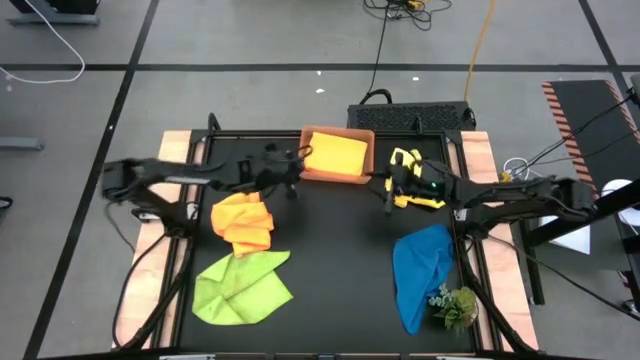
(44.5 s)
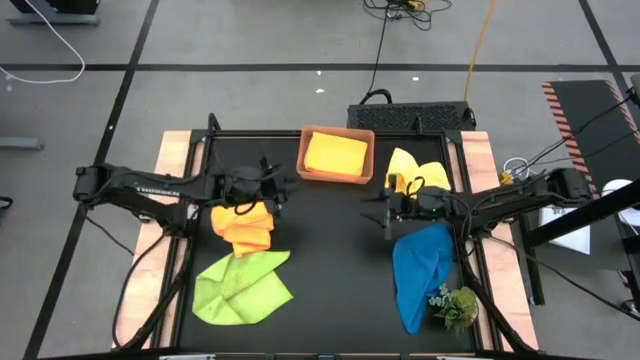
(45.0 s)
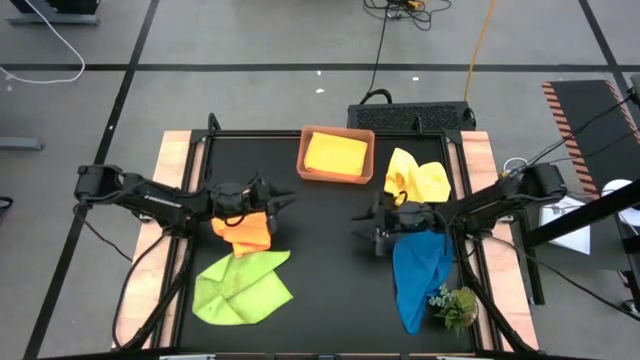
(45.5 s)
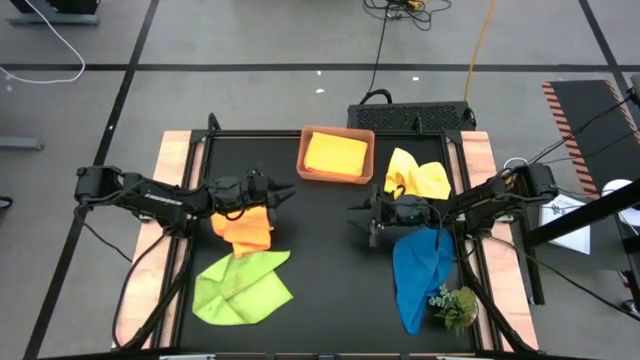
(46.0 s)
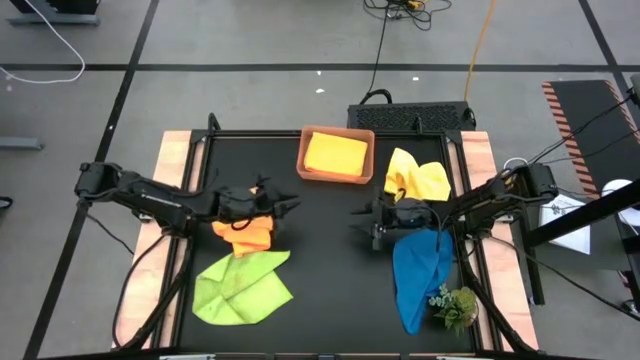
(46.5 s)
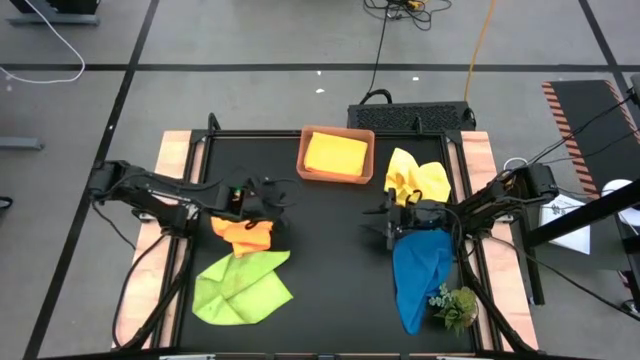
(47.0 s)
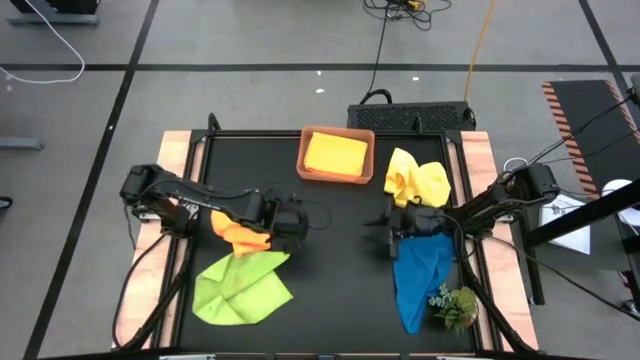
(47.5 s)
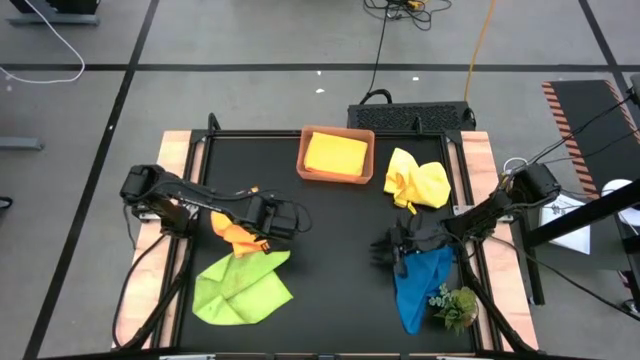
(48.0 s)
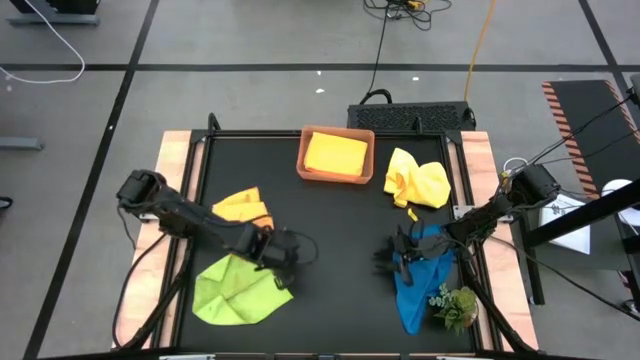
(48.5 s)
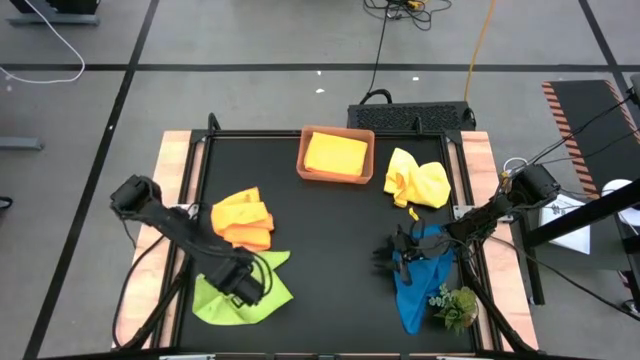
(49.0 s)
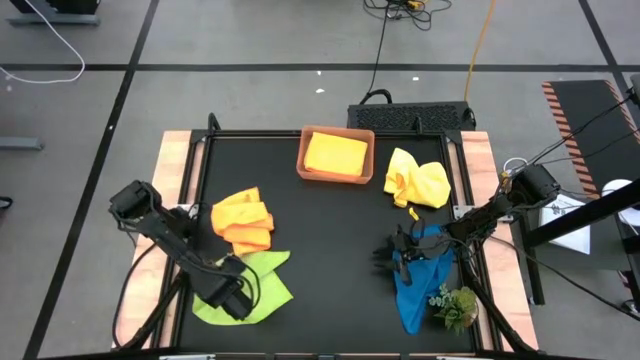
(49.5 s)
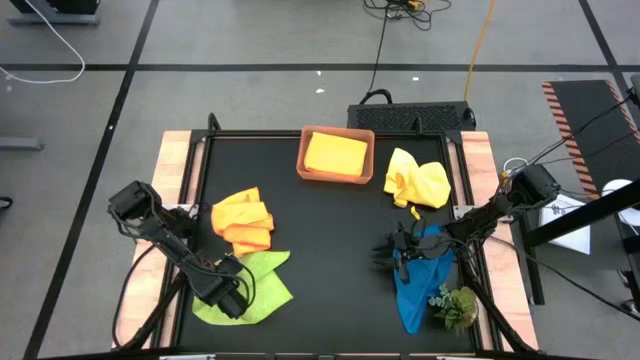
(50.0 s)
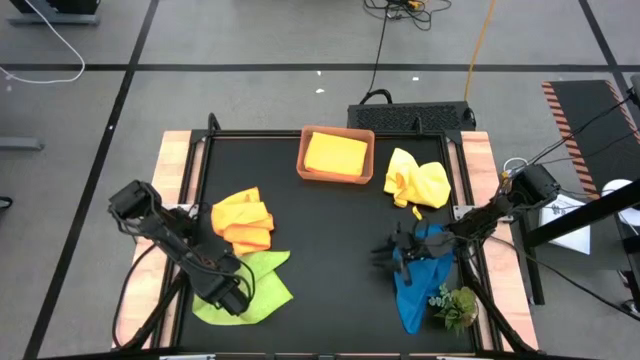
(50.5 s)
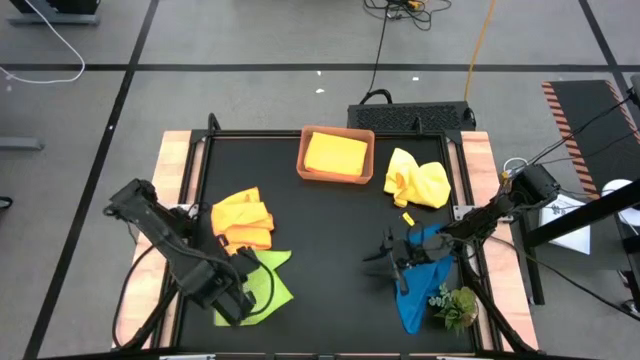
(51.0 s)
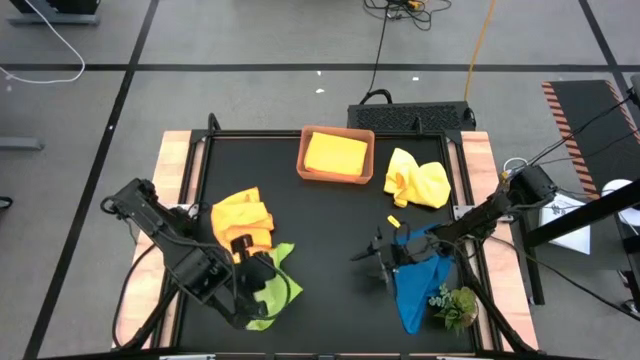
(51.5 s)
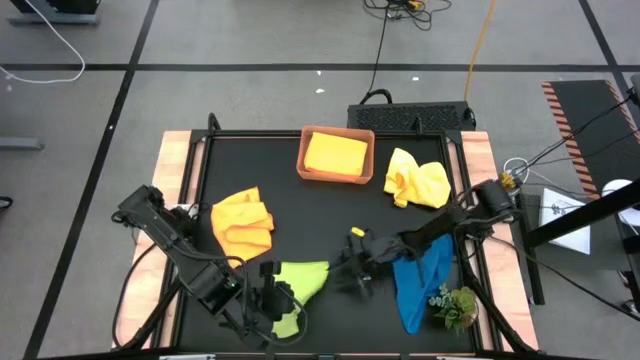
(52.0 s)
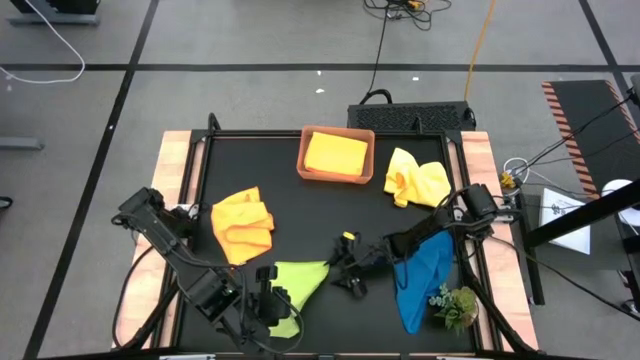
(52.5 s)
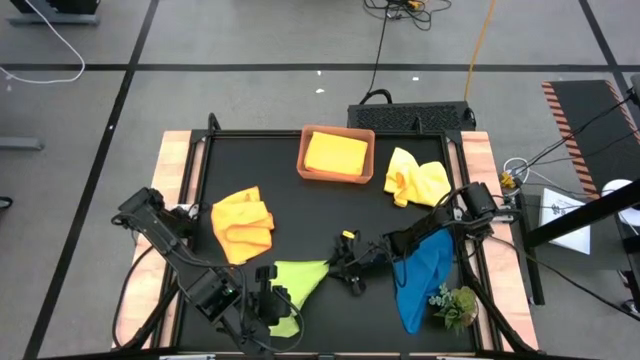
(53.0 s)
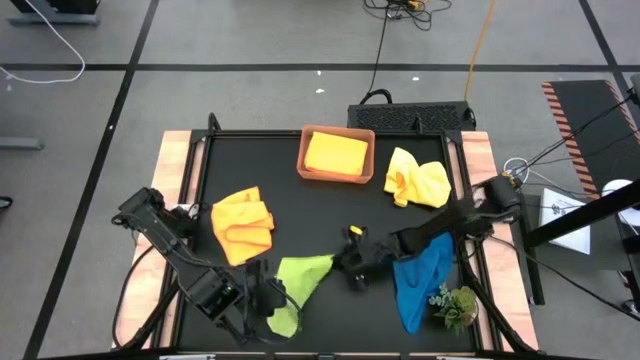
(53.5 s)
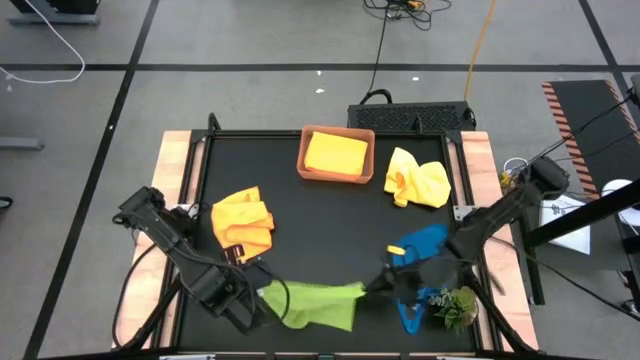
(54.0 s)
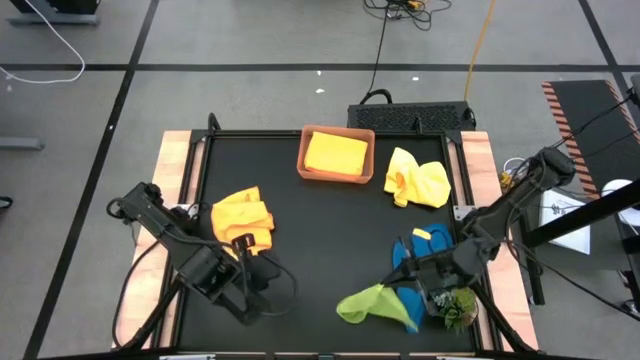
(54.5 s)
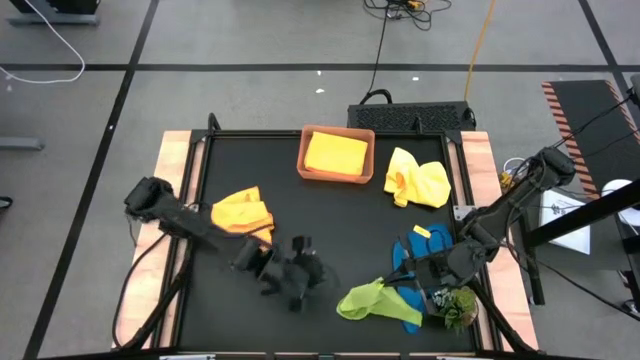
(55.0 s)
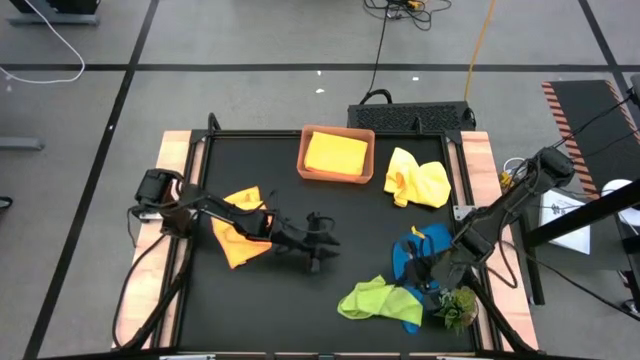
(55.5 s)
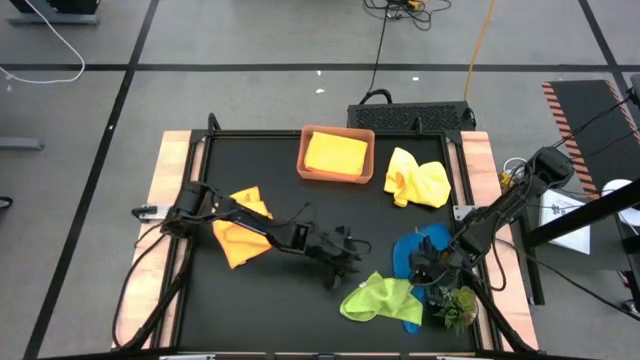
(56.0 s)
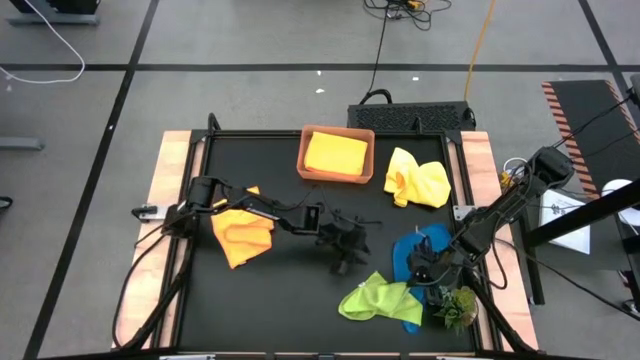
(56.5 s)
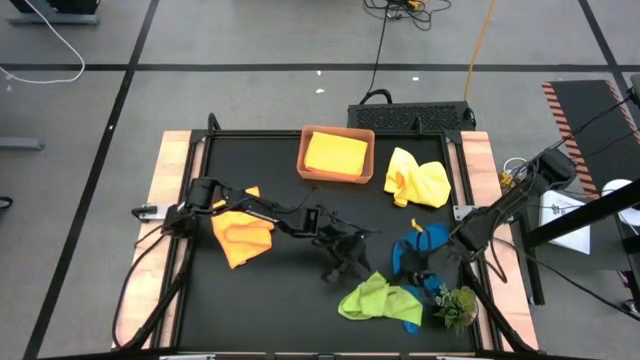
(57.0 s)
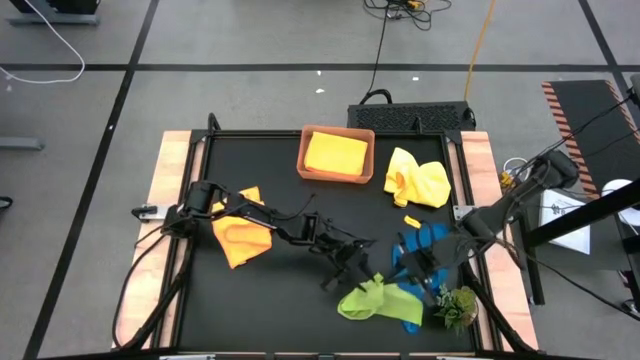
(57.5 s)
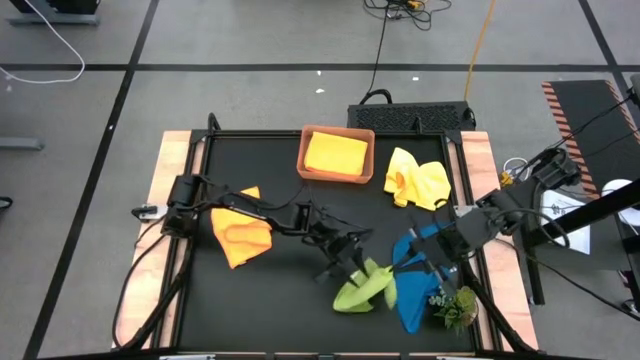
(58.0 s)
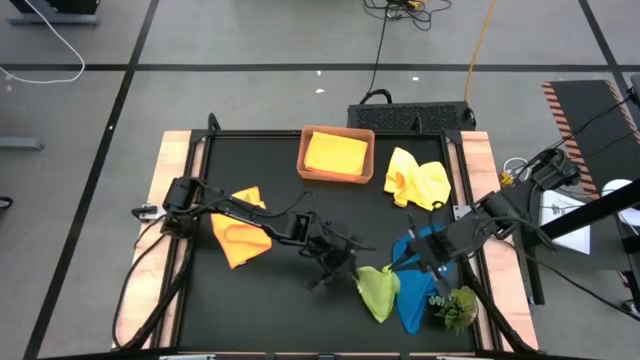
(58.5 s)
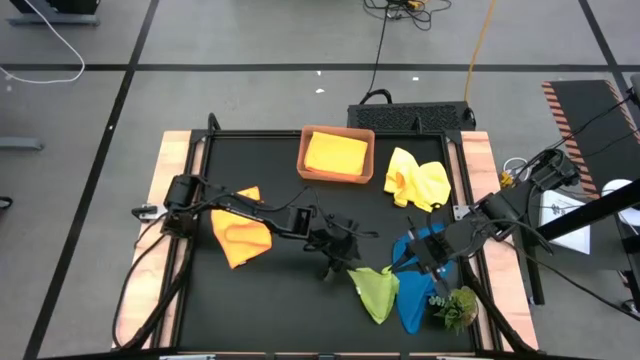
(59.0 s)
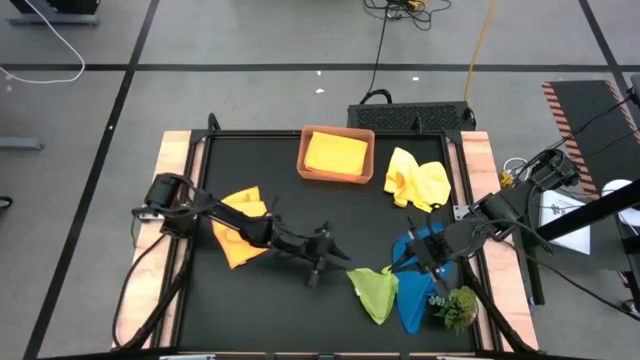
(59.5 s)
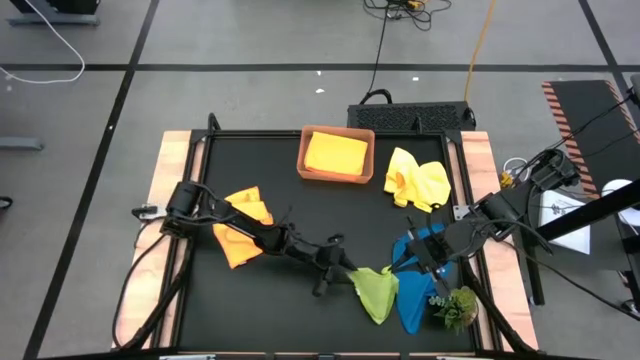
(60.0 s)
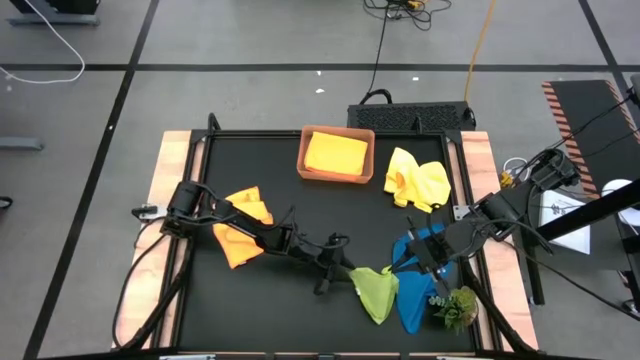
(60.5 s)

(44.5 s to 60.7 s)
Task: Fold microfiber towels
Fold the light green microfiber towel

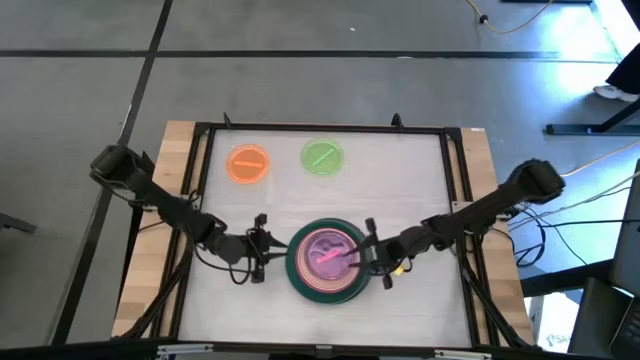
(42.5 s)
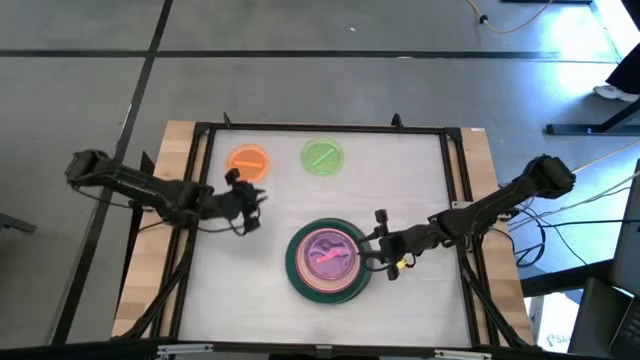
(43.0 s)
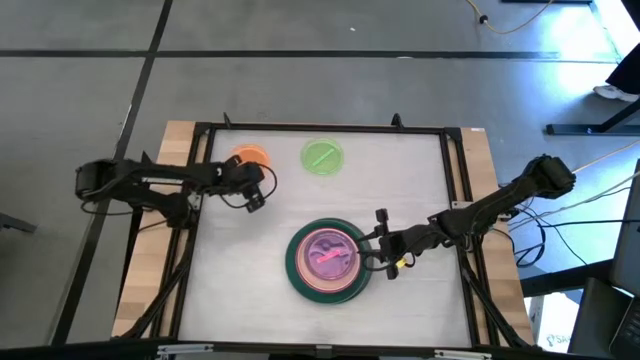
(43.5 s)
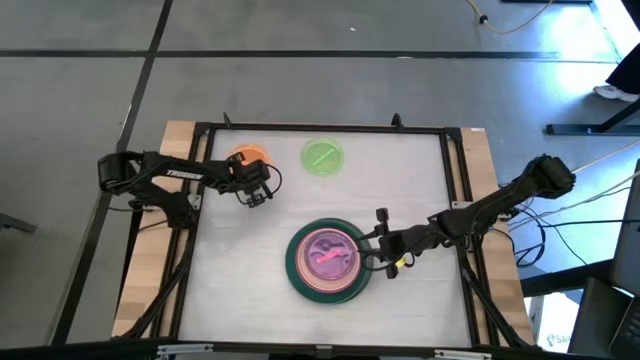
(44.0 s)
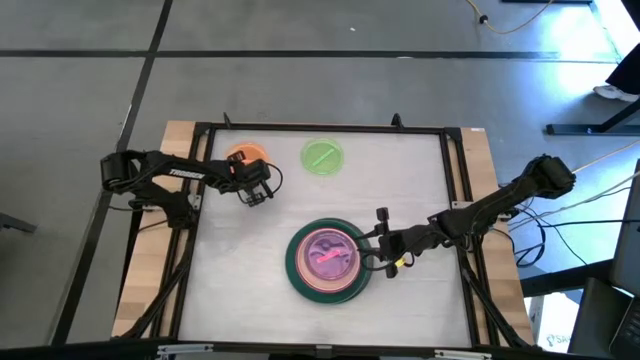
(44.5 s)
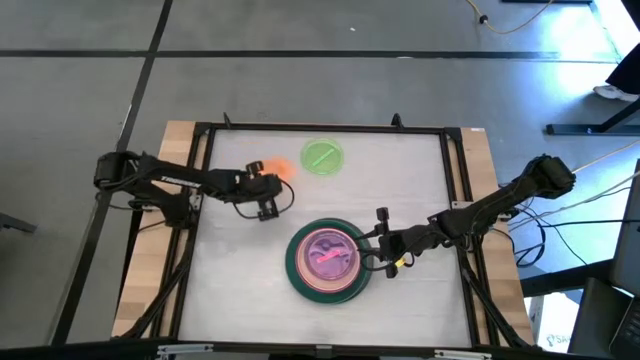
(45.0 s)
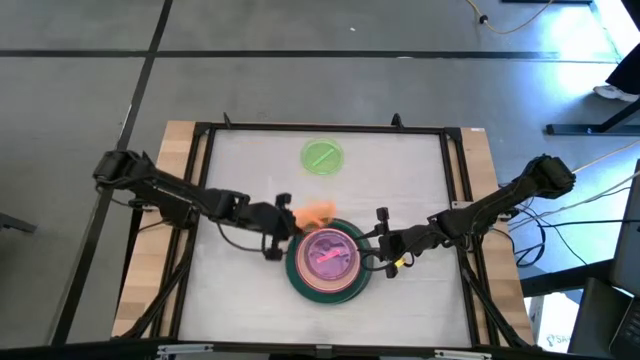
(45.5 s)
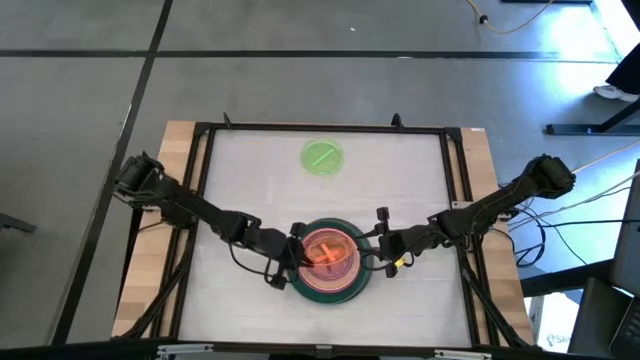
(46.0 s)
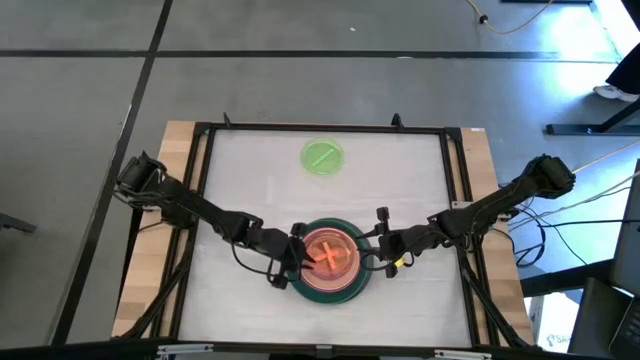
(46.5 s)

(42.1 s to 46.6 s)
Task: Stack plastic plates
Stack the light orange plate on top of the light pink plate
